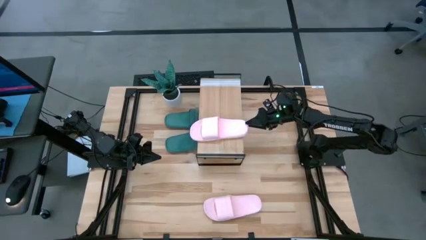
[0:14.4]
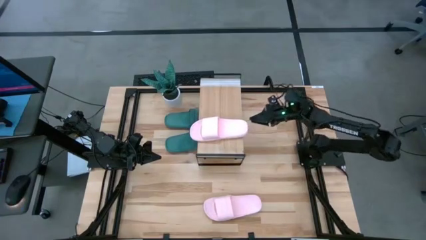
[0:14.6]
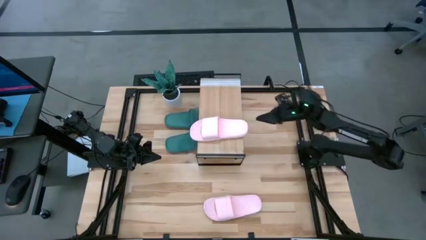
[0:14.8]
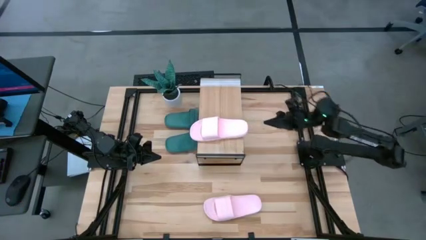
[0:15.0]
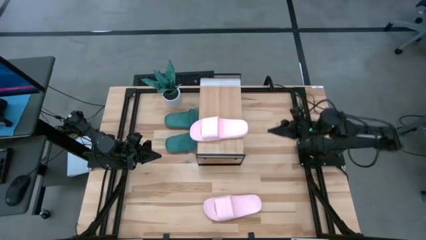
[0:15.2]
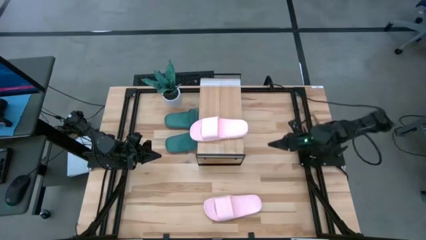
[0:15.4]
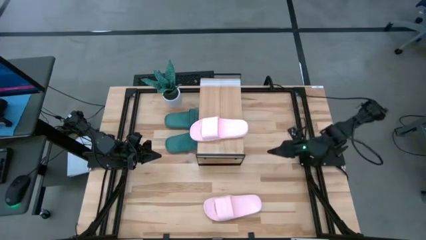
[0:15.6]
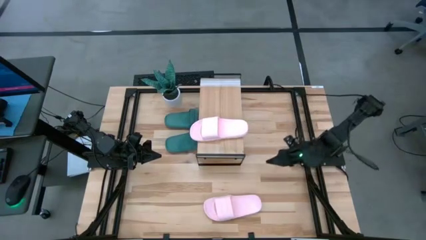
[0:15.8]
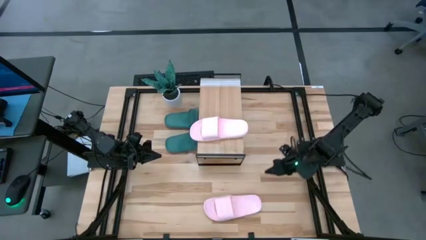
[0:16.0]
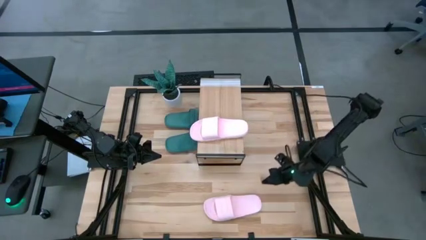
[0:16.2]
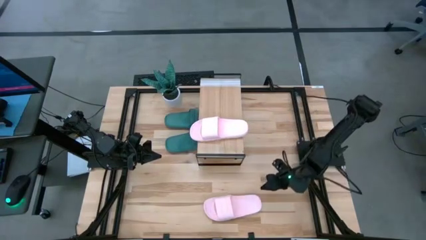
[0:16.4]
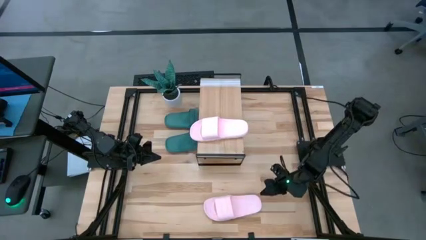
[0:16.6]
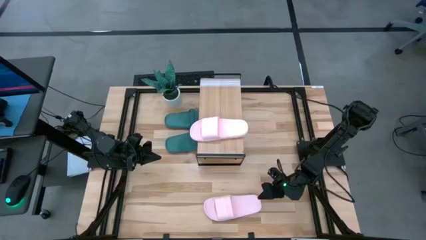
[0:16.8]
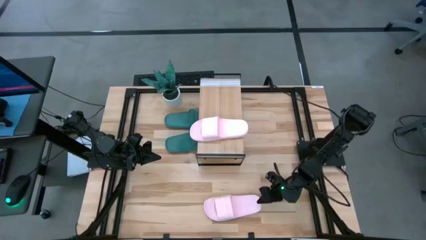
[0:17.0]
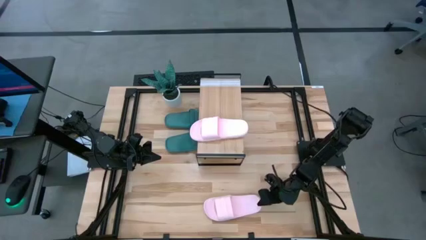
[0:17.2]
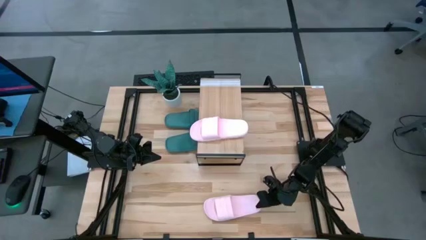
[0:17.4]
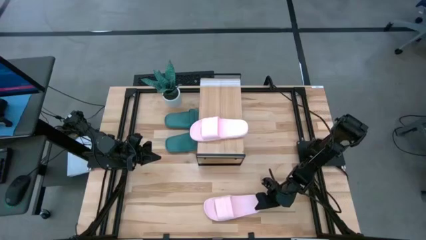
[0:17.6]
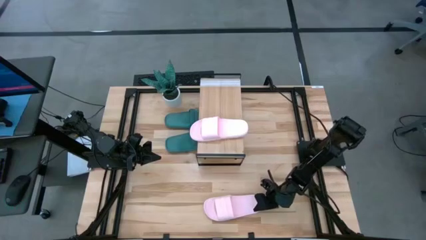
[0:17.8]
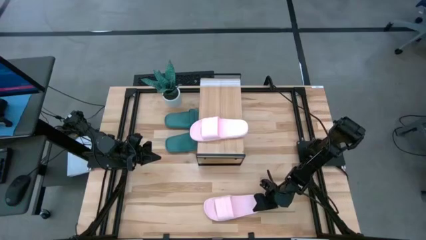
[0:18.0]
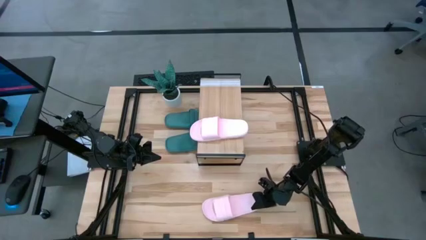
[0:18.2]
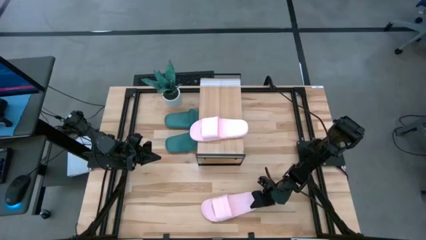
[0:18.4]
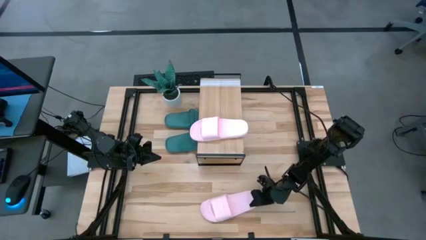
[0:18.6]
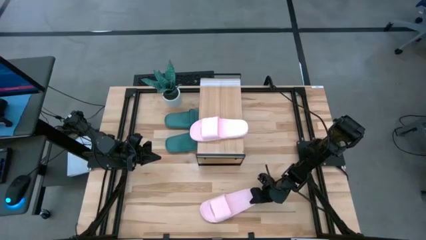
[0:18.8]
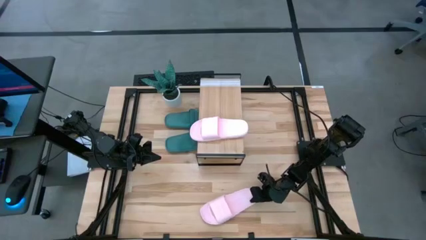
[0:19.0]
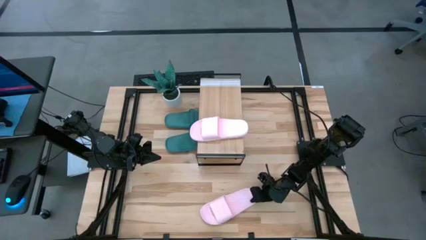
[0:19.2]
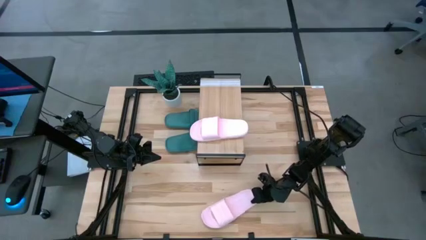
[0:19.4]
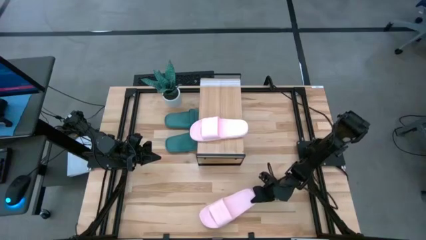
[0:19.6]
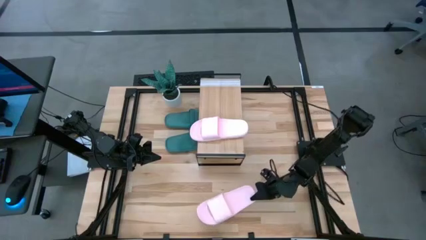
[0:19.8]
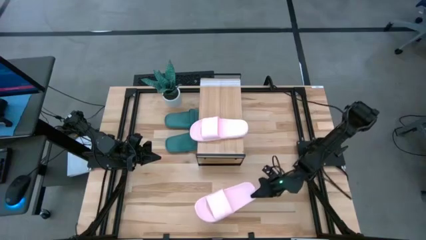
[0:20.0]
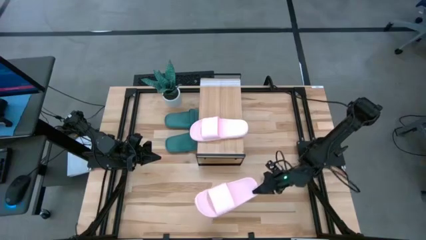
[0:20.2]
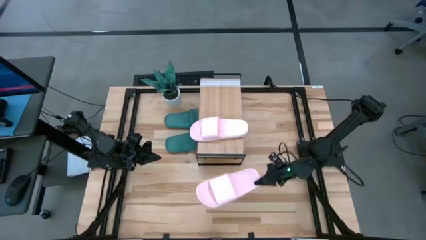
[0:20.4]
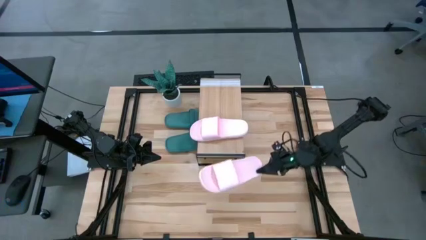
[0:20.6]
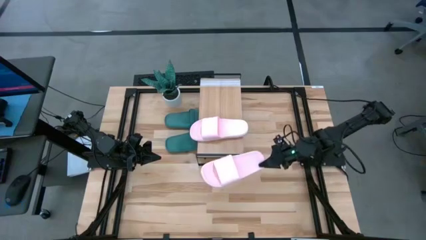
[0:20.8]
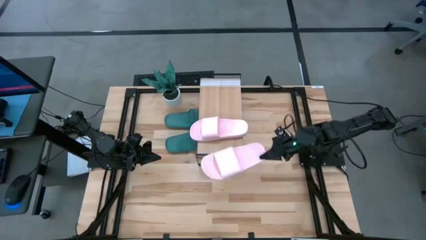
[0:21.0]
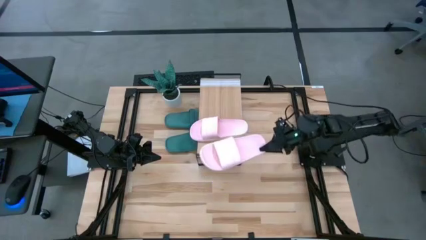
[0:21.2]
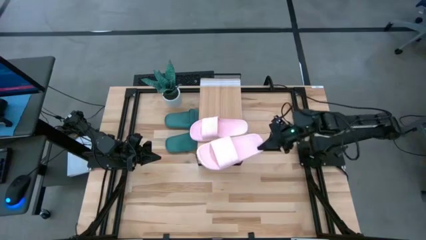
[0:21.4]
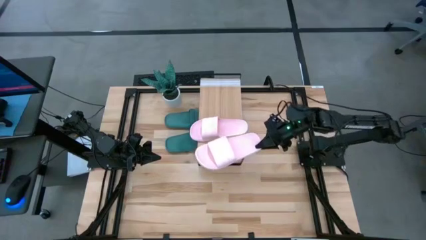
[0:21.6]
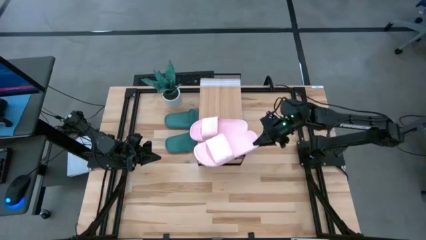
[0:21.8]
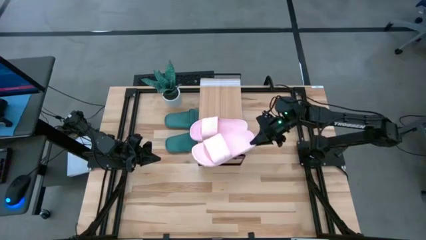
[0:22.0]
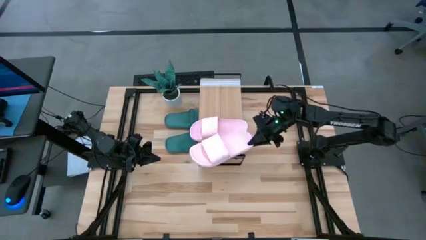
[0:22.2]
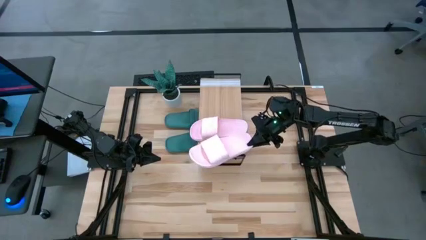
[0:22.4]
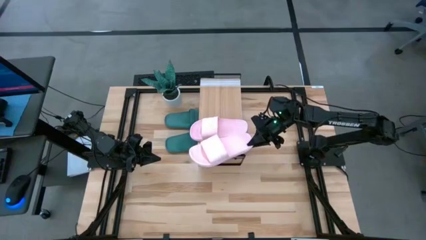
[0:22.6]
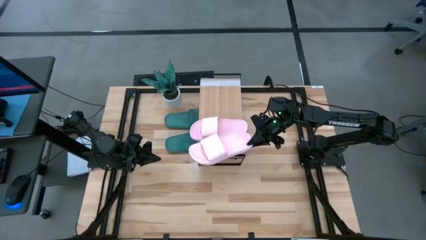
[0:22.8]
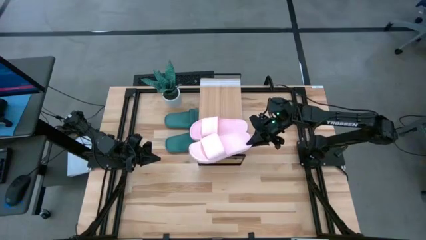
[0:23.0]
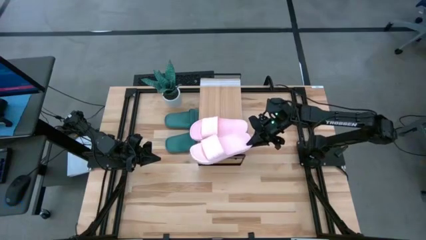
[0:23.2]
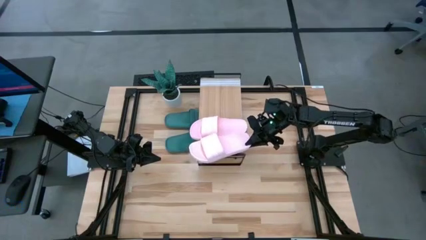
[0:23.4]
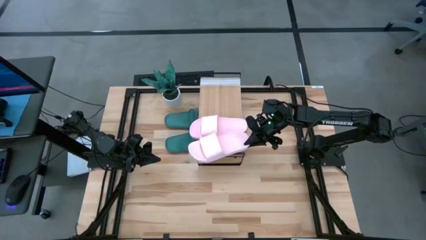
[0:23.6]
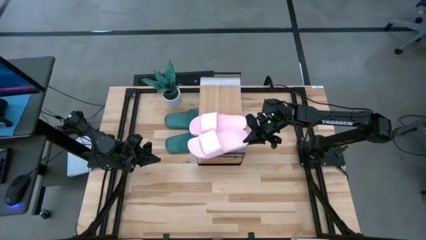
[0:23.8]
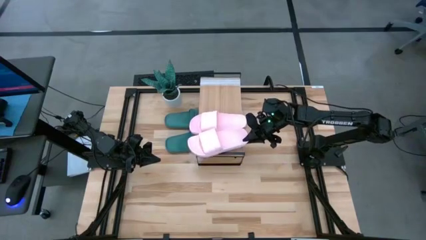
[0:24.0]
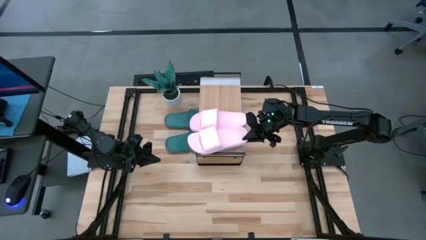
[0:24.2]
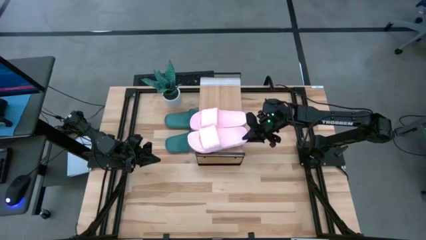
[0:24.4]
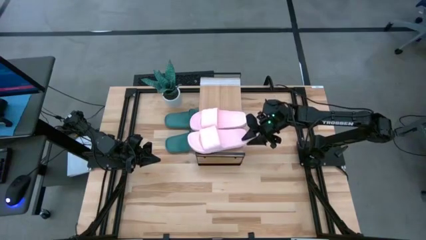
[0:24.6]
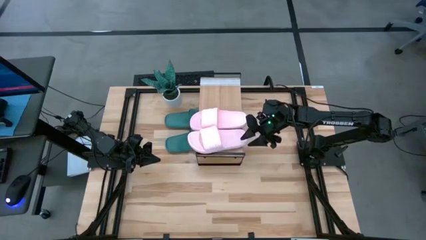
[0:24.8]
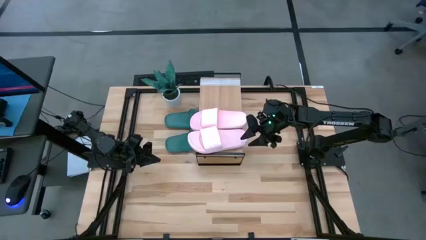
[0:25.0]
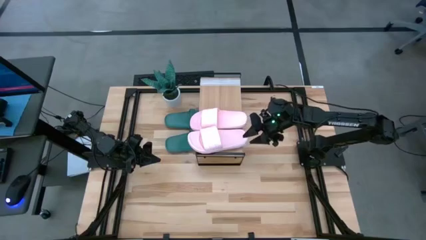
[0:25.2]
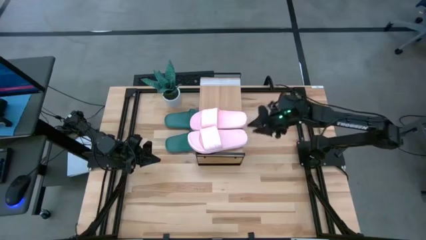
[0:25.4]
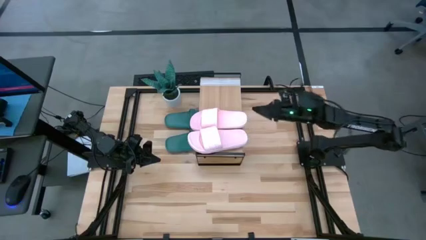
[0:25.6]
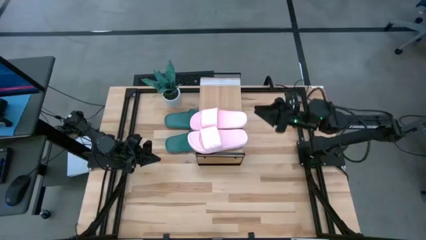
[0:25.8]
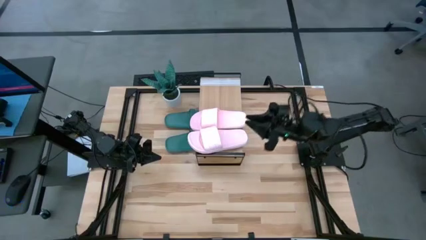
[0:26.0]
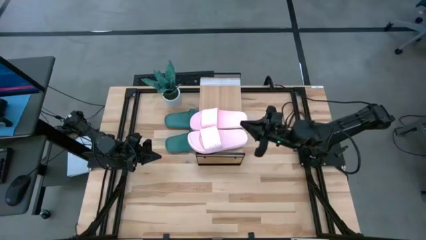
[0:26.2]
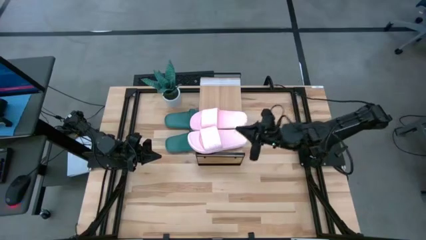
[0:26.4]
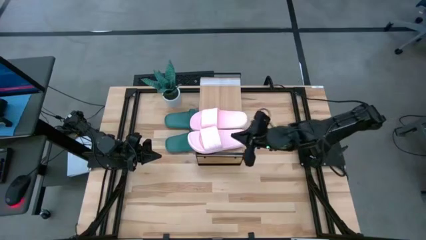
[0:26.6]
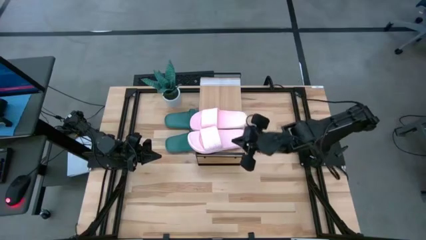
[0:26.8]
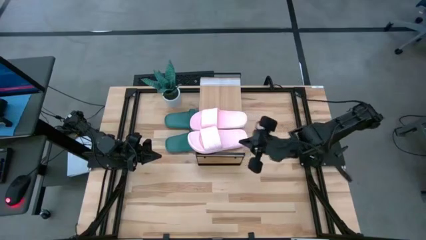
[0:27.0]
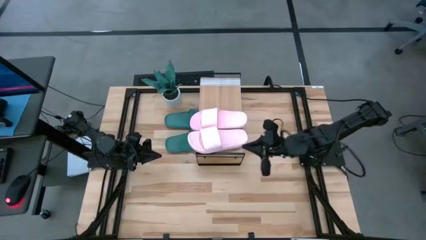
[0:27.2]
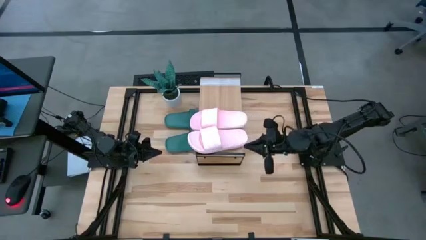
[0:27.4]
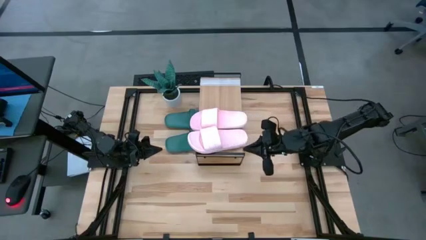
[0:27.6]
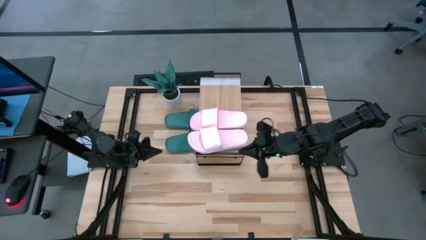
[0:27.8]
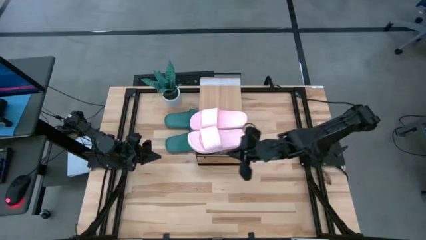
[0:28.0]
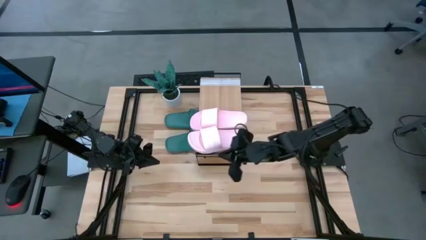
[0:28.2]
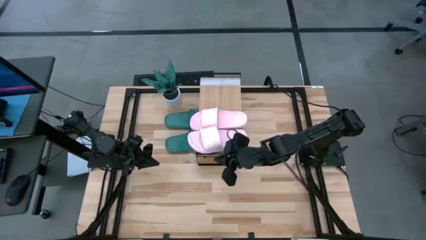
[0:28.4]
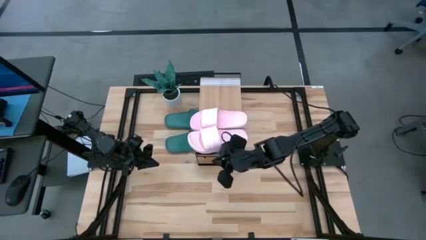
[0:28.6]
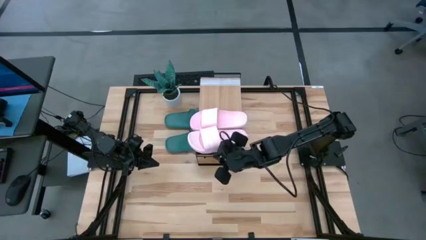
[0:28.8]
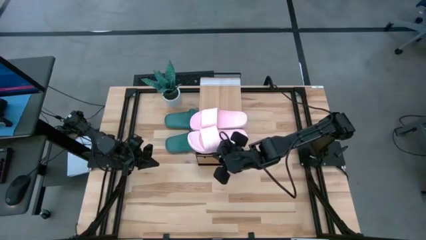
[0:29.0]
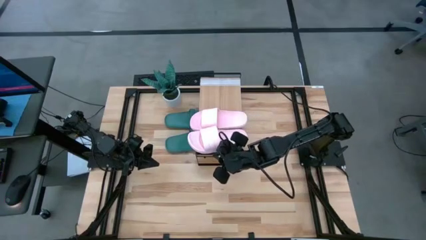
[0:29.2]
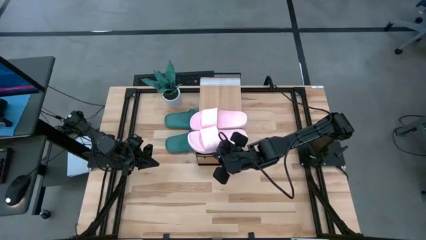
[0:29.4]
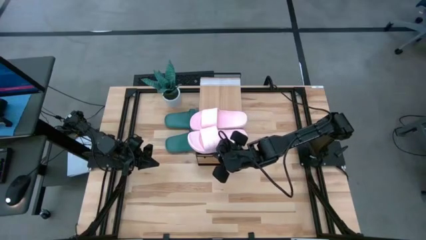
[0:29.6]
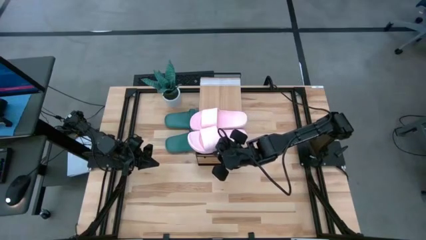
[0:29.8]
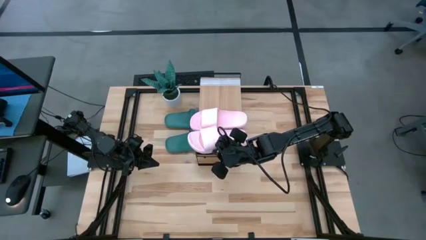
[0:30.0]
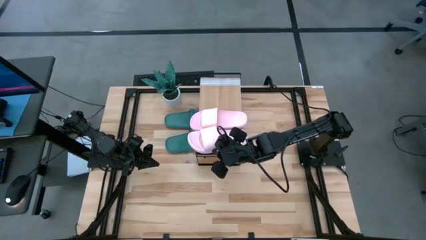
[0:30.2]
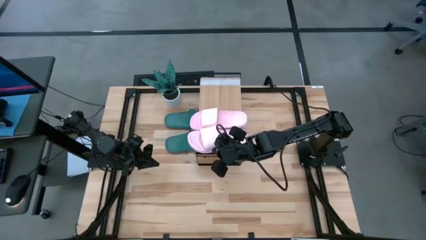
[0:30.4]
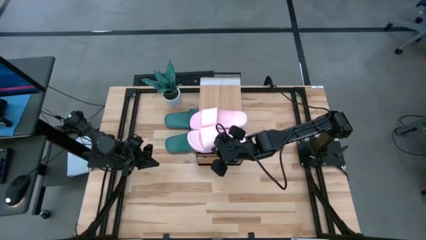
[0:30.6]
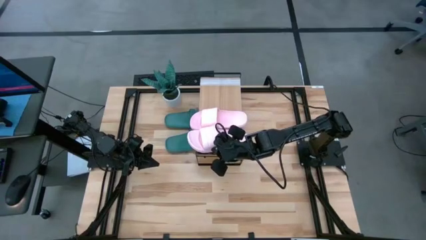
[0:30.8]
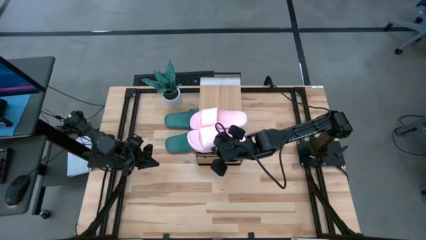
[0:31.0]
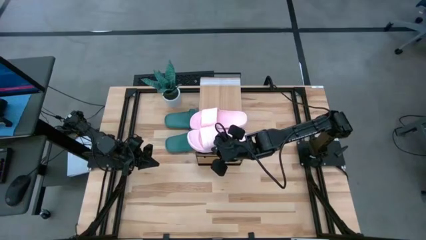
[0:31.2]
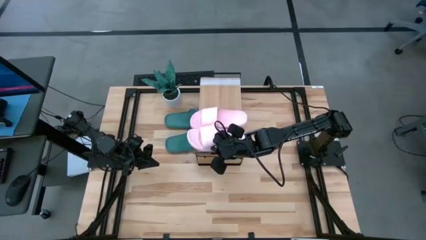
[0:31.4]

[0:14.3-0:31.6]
Task: Pick and place slides into the shelf
Put the pink slipper on the shelf
